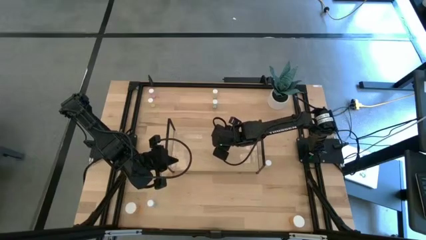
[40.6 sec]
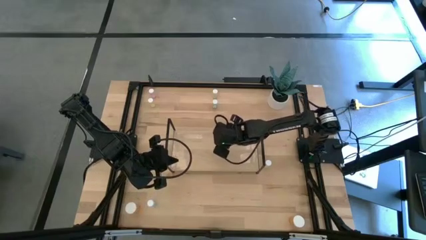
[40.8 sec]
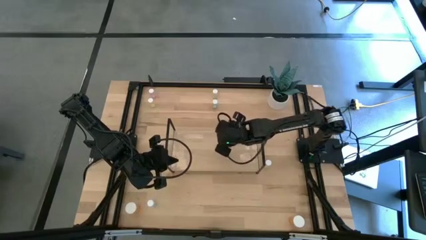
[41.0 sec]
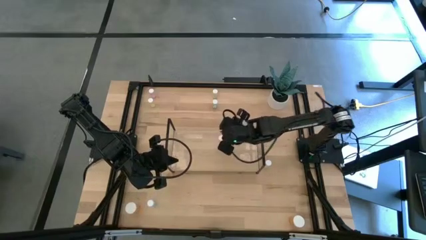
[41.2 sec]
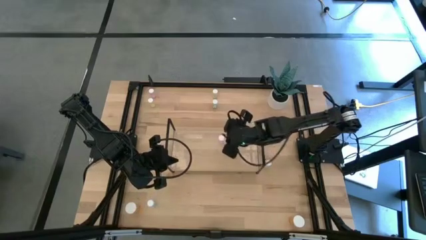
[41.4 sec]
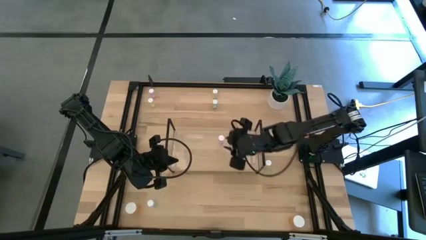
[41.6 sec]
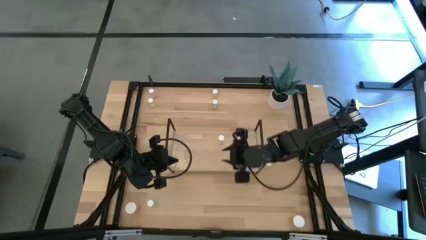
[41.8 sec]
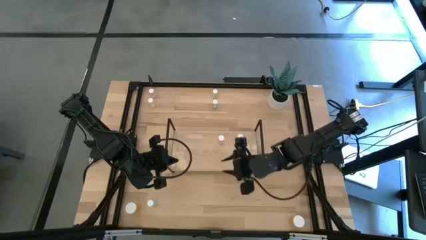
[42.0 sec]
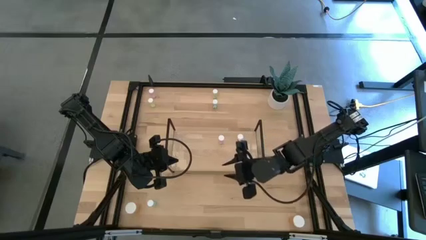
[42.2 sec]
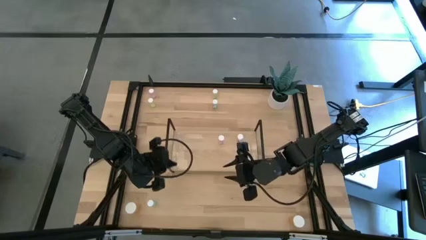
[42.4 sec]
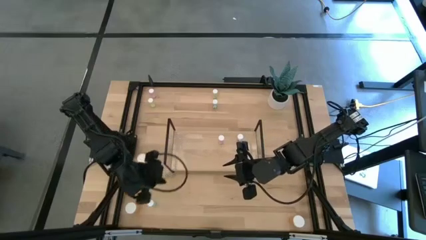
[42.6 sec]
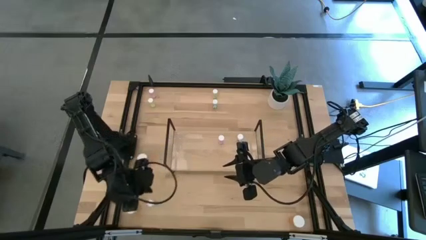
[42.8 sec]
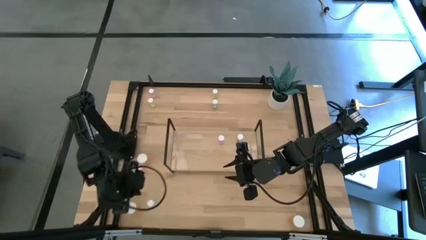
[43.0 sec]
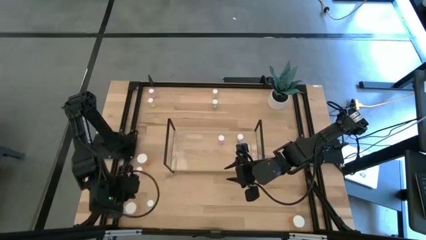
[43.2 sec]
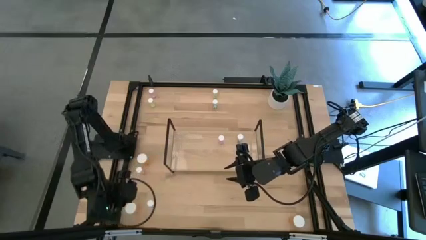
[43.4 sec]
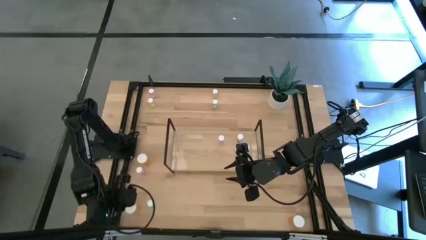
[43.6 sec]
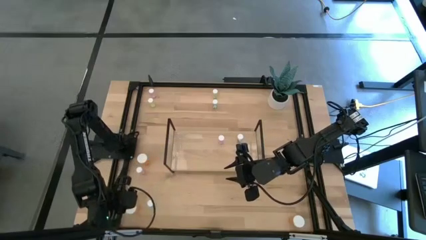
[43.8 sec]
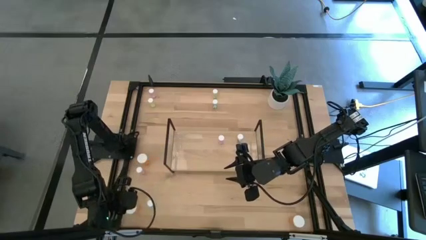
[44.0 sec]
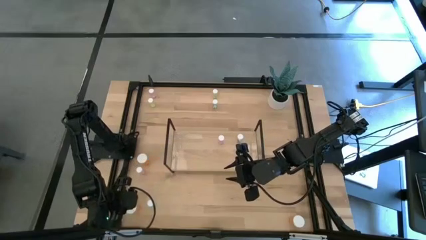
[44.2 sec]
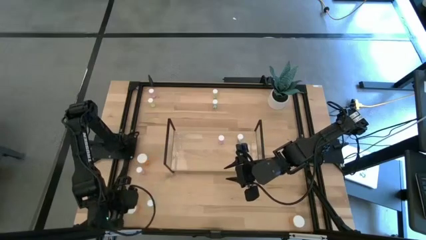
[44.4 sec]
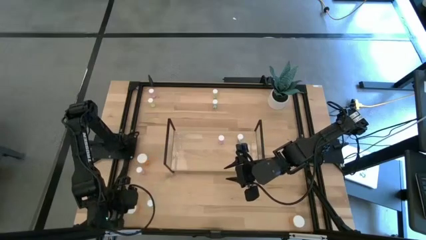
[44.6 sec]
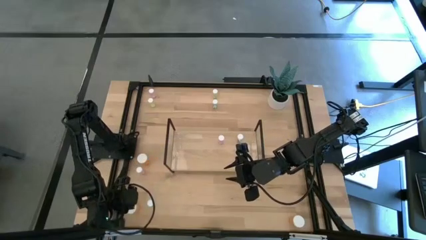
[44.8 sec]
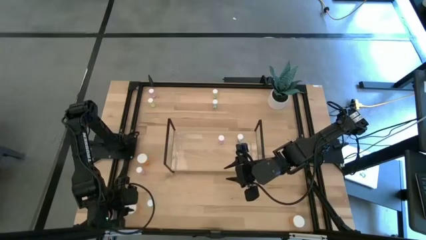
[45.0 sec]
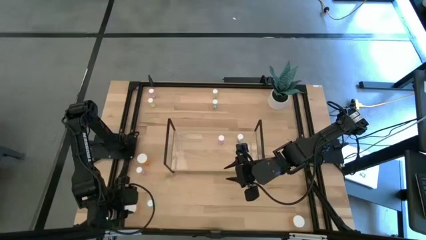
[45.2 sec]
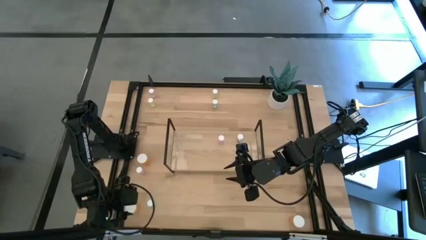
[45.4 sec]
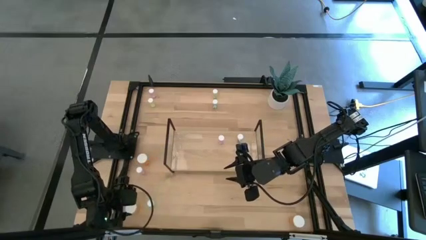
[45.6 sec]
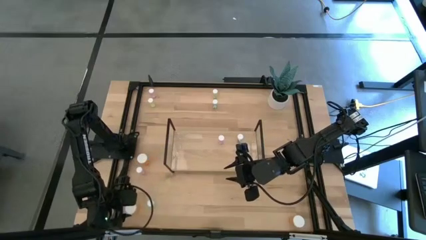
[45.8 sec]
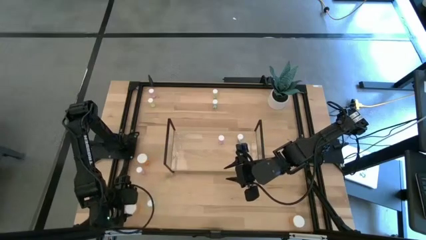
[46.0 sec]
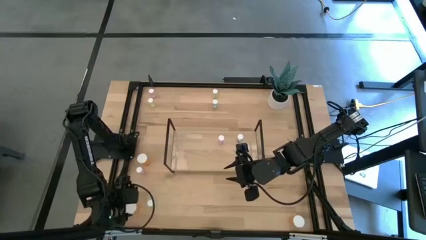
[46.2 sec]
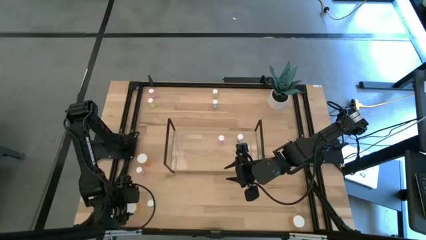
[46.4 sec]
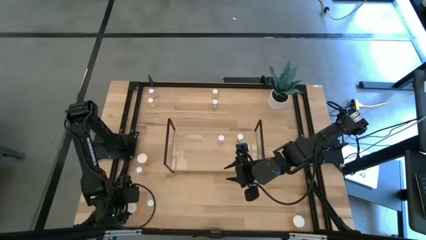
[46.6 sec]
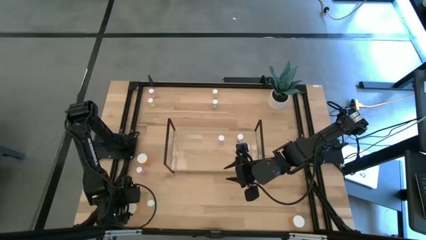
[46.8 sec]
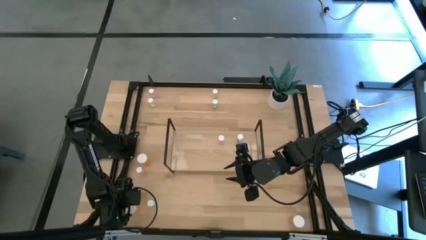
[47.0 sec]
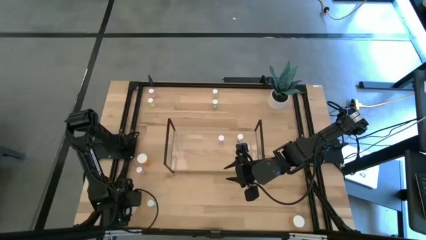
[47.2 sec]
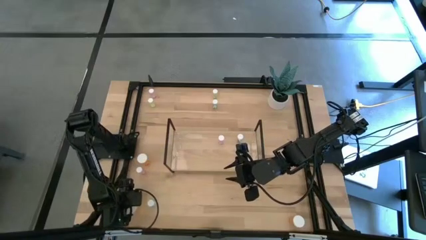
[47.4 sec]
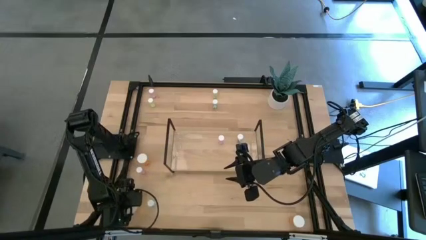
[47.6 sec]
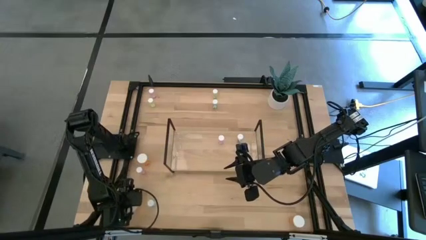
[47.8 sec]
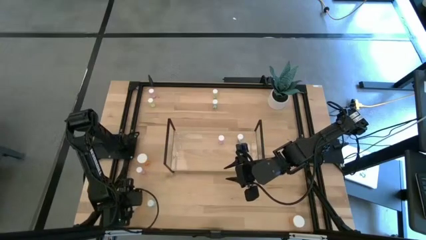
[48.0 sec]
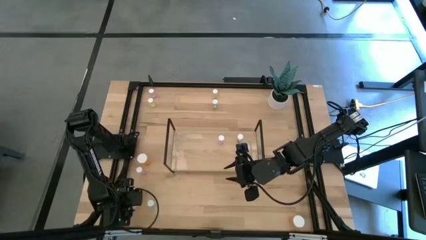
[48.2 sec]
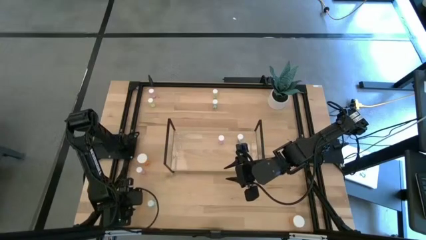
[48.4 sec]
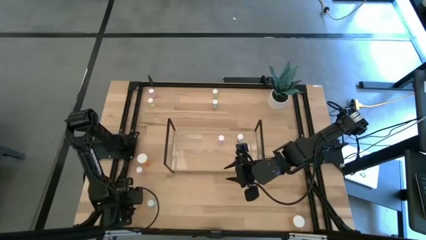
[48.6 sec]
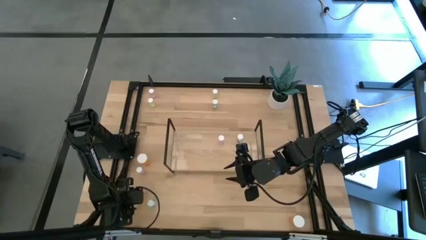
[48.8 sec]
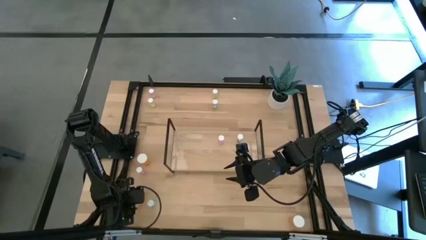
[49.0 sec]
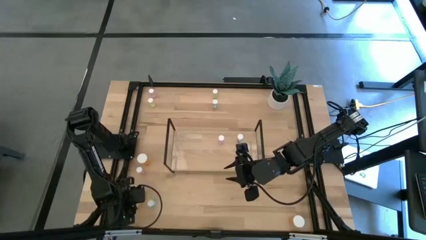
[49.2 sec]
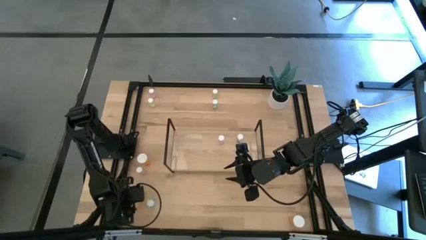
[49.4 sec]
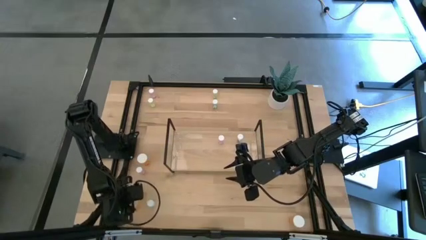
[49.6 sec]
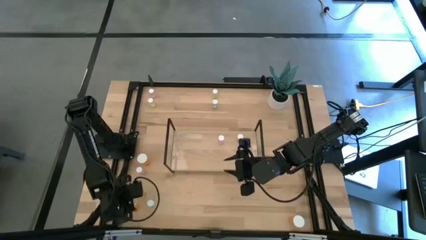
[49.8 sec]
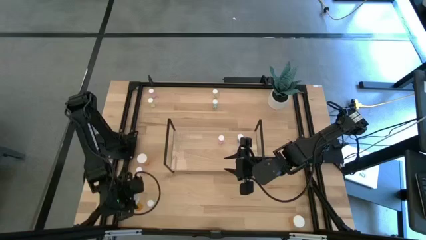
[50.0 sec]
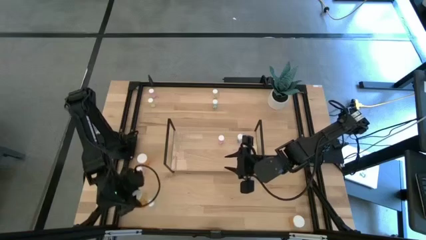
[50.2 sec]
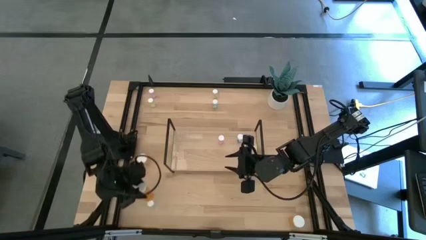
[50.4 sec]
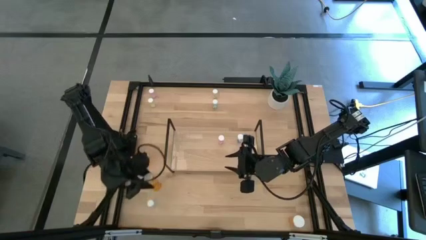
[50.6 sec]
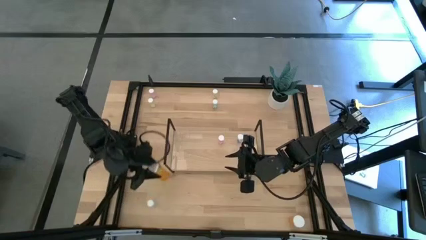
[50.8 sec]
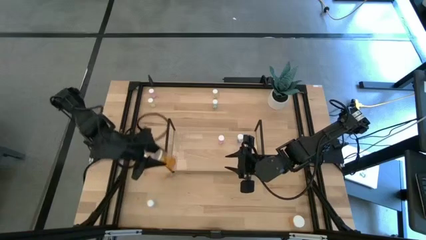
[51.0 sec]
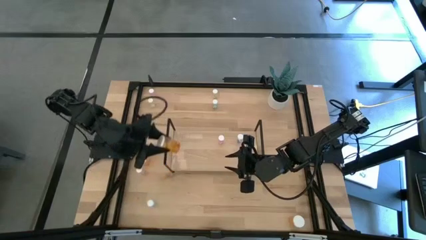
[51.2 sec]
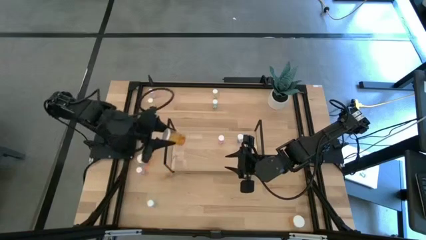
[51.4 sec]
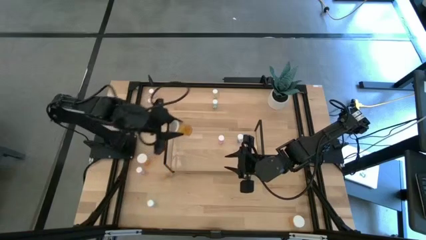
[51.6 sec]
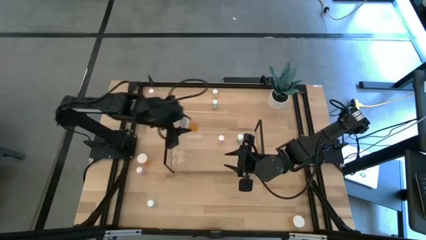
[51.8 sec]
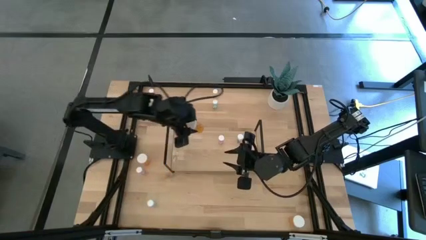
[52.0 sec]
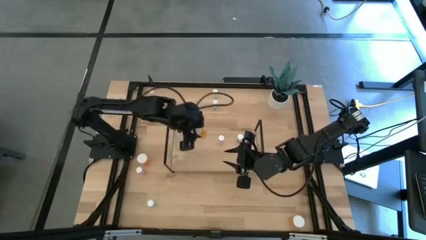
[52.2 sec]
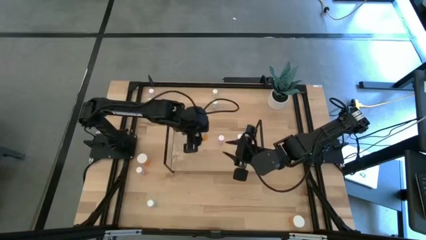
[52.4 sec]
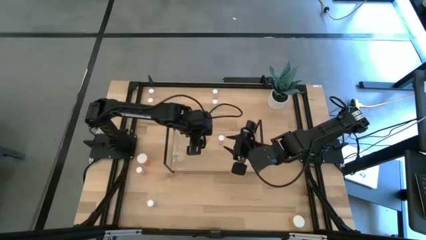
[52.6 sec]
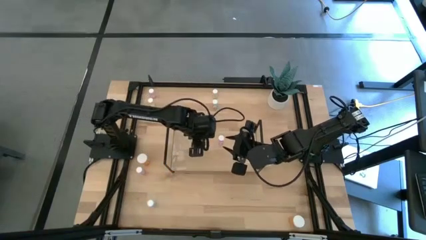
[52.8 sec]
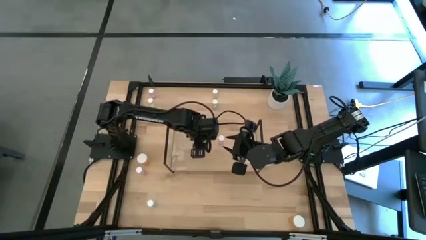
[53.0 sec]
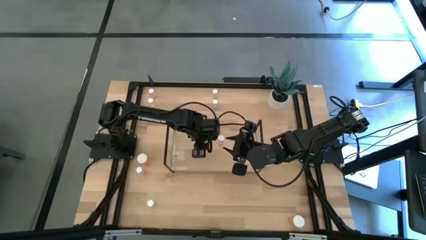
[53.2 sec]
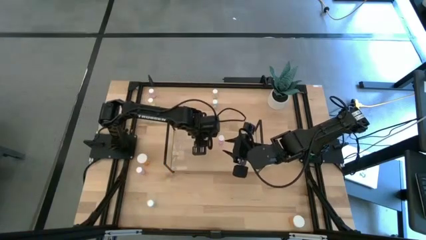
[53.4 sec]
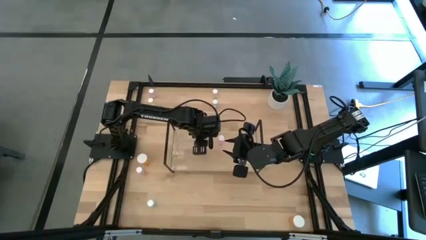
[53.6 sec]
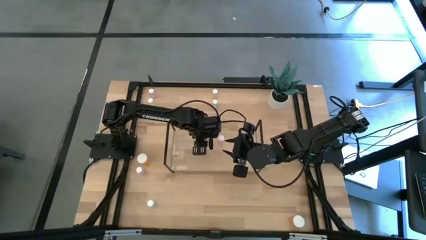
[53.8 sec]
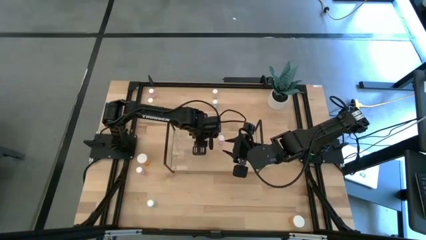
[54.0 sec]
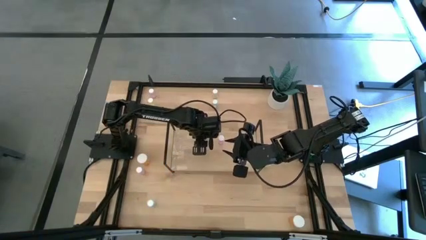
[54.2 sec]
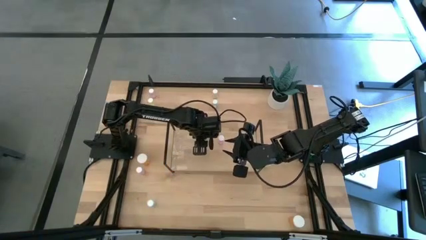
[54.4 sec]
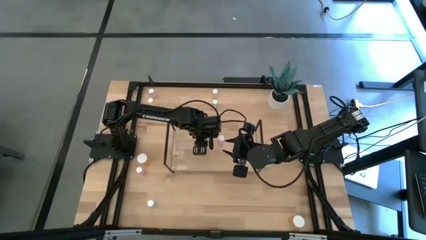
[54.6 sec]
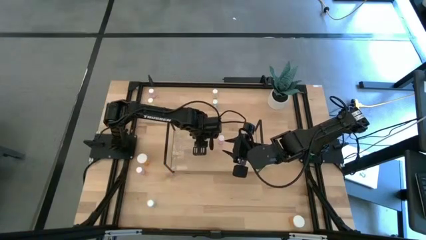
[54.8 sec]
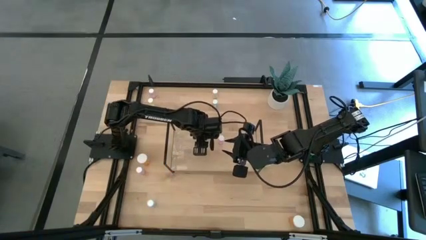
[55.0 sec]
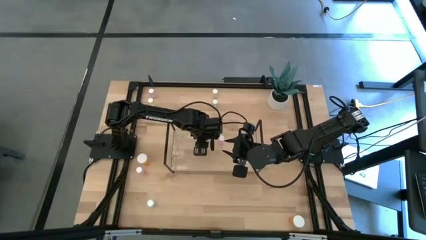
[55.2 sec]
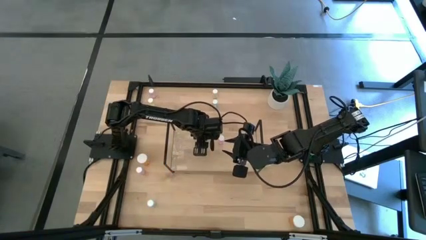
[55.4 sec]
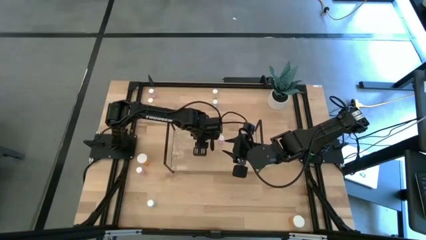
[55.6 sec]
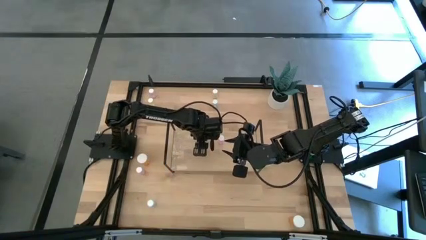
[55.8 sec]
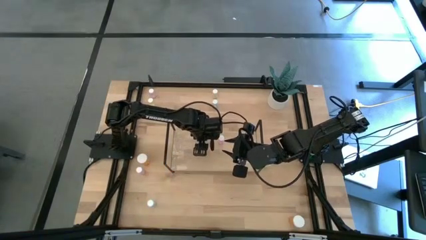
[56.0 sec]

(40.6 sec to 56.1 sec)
Task: Pick and place medicine bottles onto shelf by color
Put the bottom left orange pill bottle on the shelf
